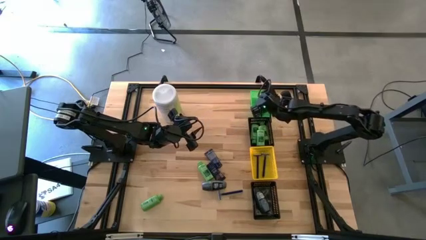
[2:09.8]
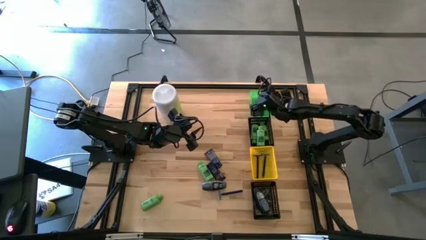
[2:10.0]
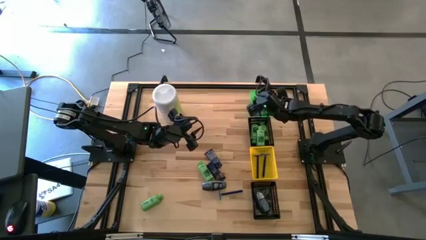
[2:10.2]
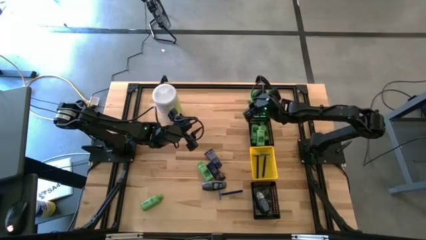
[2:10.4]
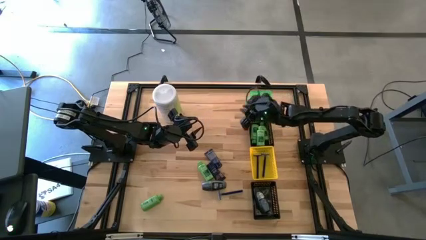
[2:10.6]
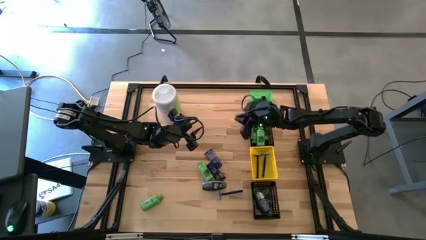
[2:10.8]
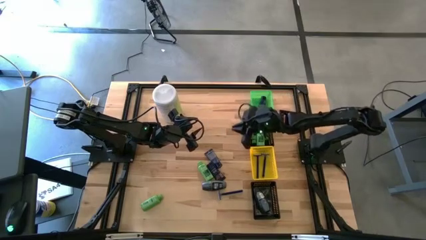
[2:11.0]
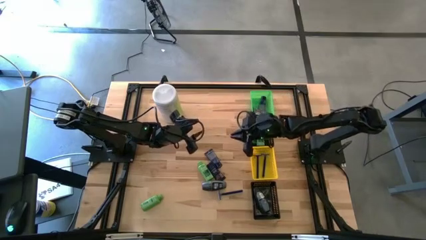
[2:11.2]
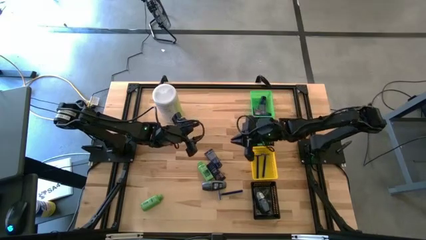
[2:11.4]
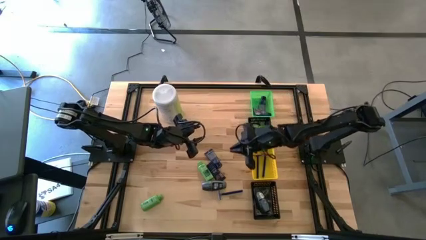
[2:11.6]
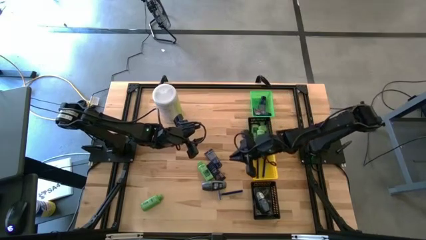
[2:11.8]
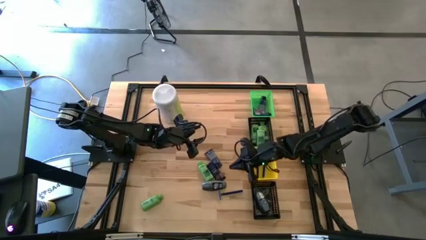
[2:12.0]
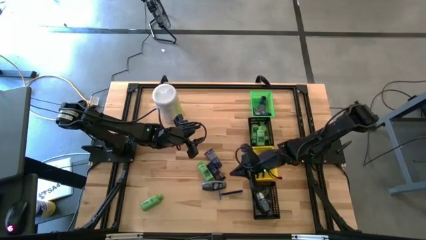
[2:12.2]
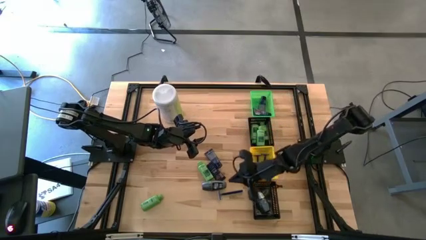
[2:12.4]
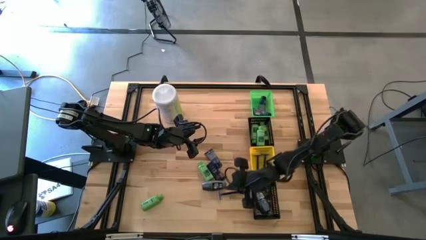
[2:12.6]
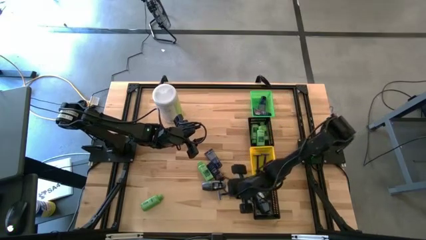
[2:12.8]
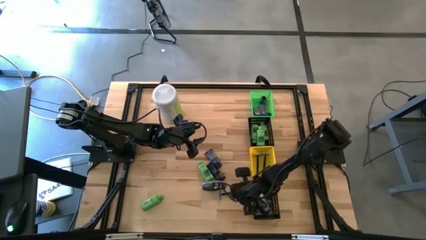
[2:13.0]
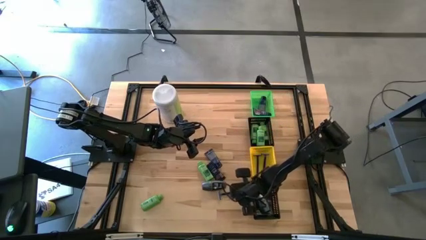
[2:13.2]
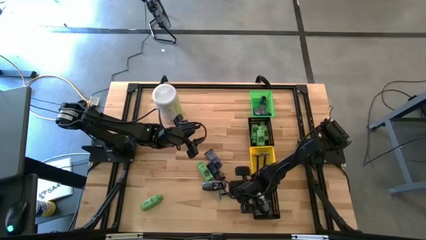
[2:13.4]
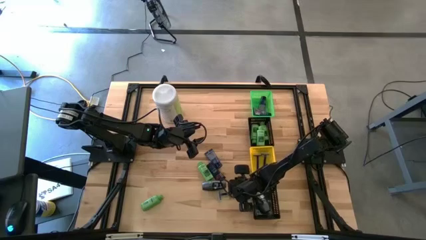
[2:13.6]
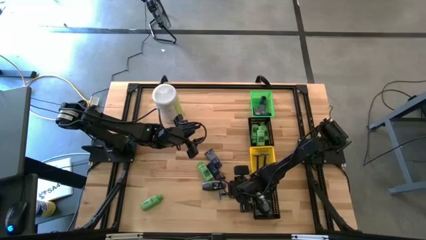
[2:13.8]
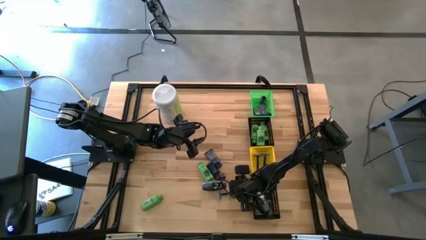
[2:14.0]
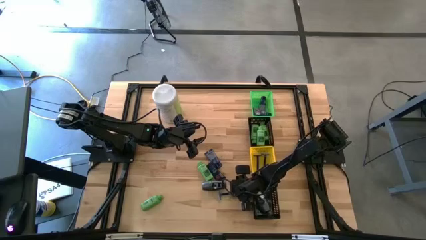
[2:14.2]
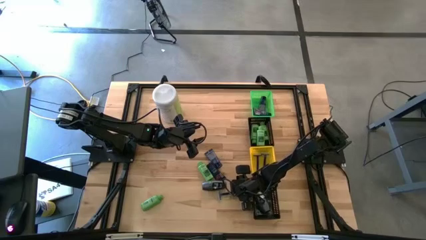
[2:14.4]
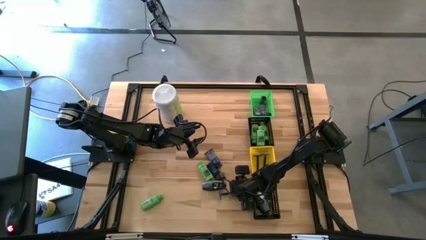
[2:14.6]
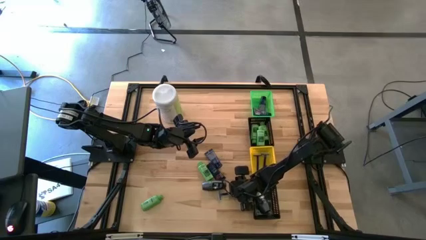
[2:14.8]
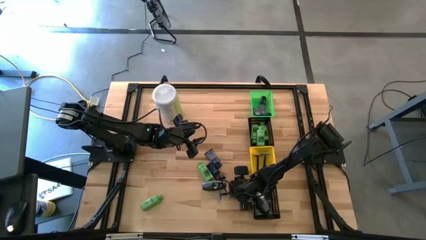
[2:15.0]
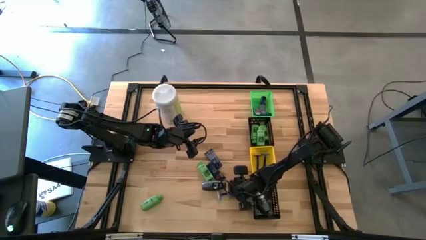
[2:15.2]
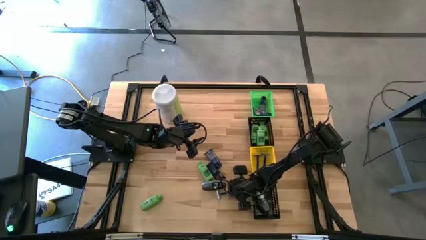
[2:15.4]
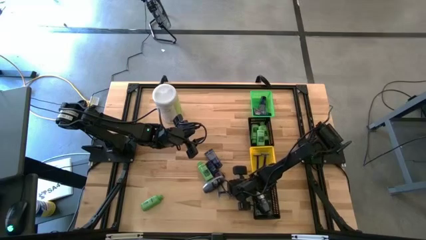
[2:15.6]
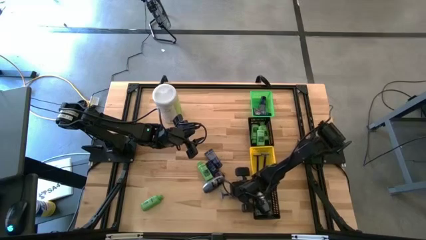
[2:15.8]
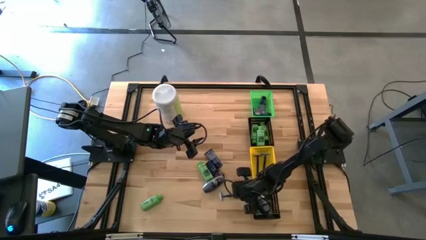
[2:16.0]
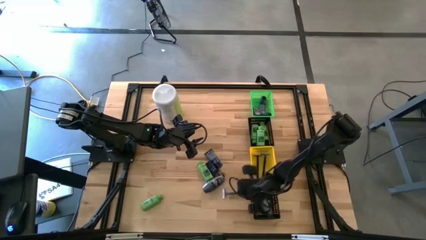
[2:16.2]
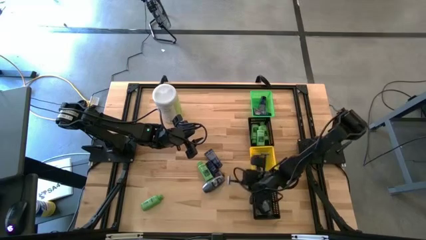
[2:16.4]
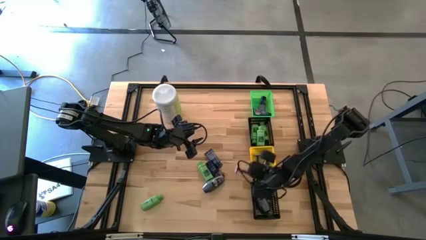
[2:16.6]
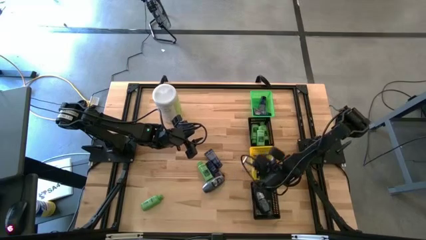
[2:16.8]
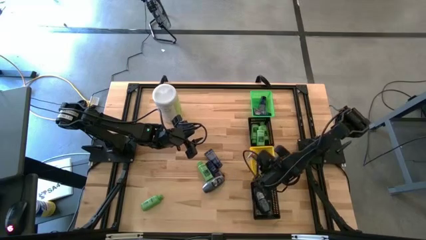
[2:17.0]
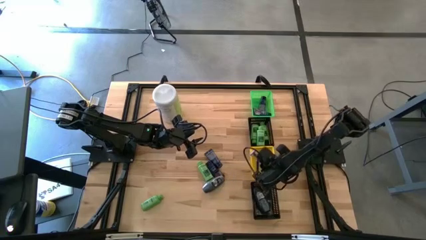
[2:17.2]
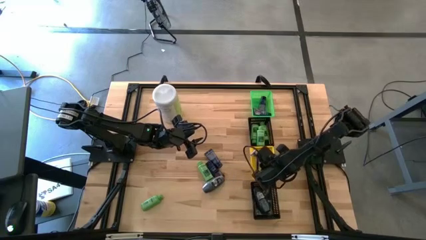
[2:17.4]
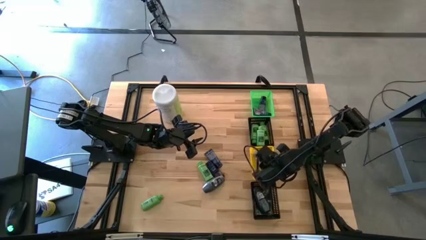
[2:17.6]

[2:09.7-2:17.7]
Task: Pick & Place Travel size toiletries
Put the blue razor into the yellow basket

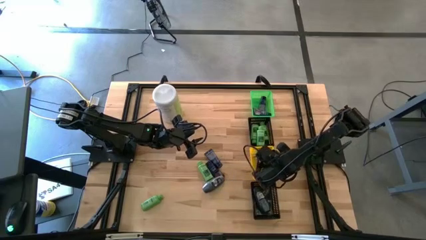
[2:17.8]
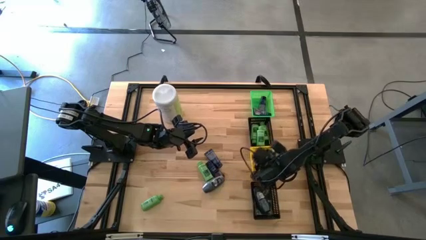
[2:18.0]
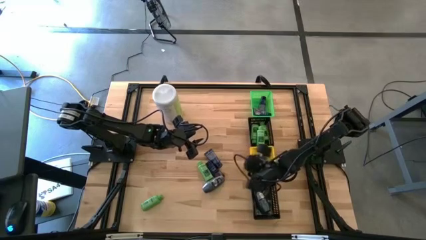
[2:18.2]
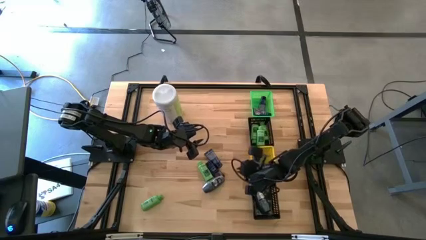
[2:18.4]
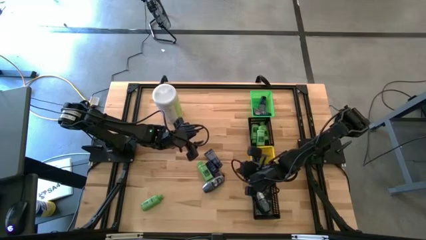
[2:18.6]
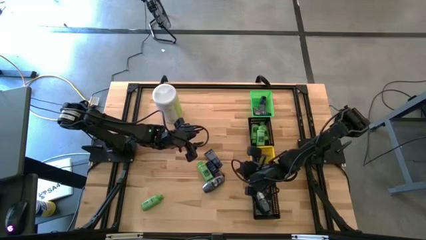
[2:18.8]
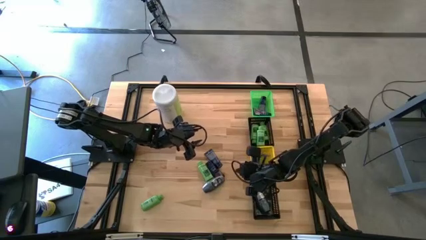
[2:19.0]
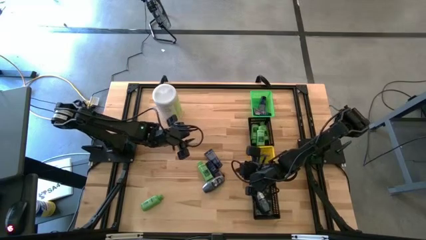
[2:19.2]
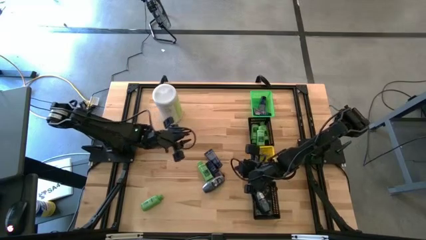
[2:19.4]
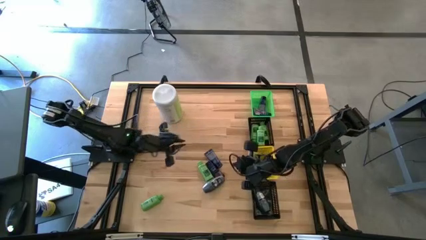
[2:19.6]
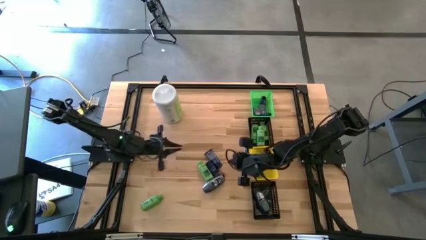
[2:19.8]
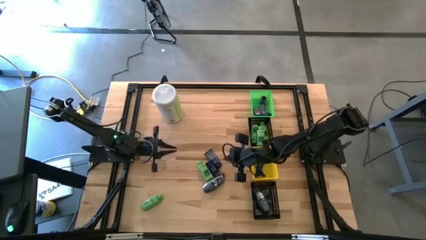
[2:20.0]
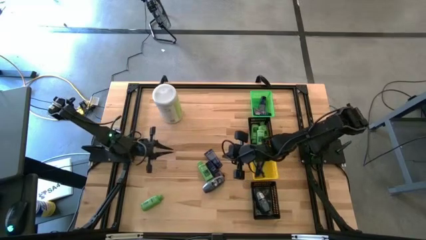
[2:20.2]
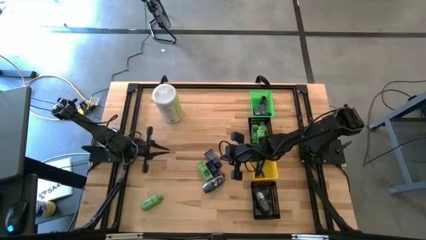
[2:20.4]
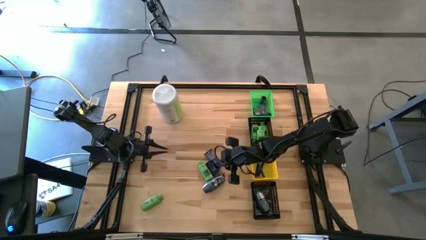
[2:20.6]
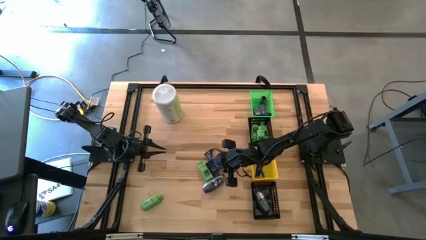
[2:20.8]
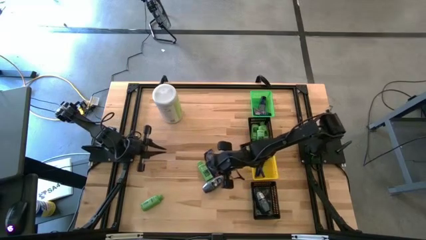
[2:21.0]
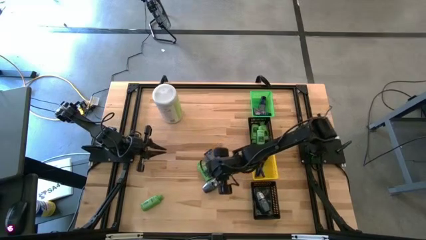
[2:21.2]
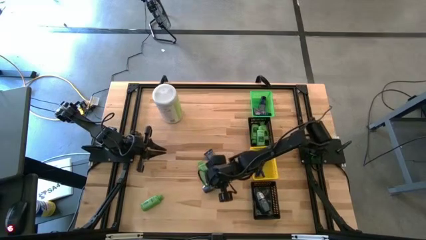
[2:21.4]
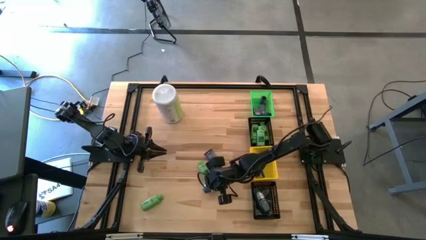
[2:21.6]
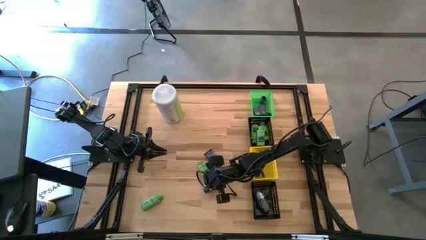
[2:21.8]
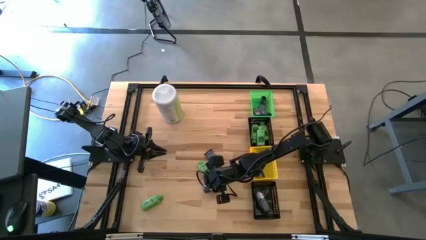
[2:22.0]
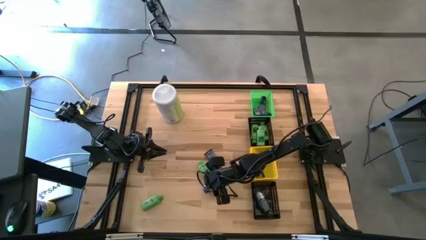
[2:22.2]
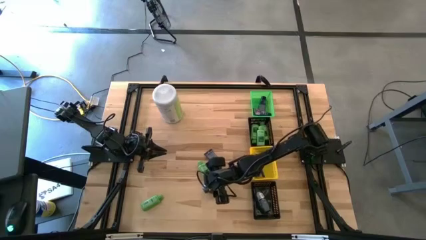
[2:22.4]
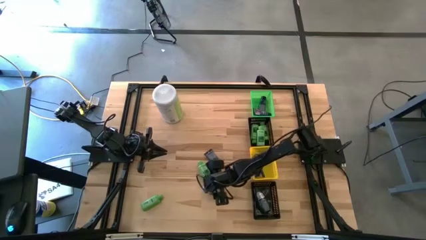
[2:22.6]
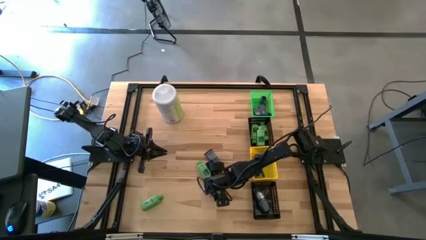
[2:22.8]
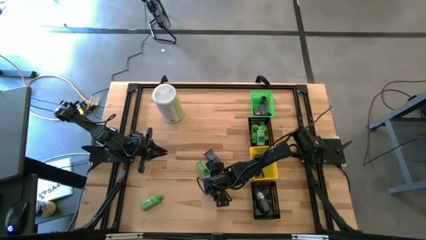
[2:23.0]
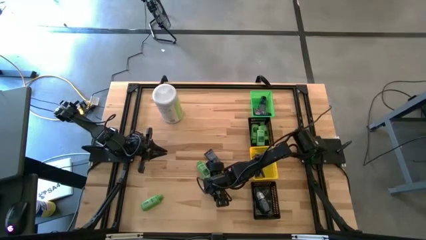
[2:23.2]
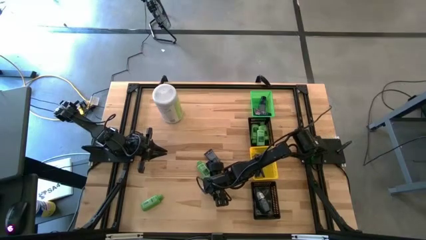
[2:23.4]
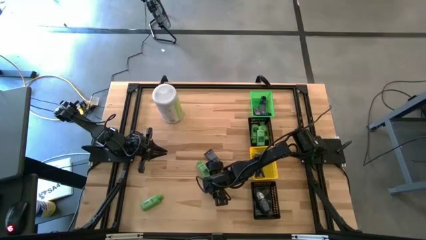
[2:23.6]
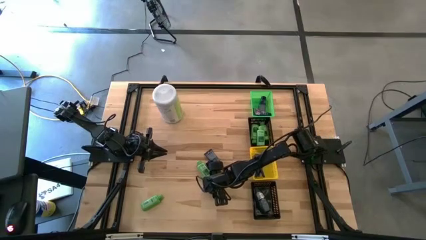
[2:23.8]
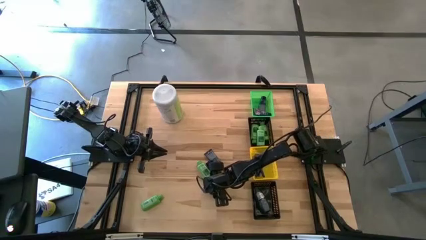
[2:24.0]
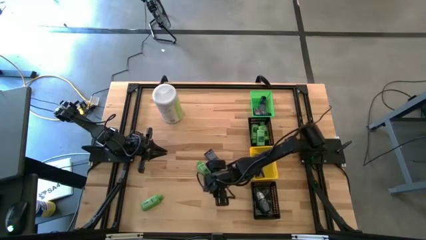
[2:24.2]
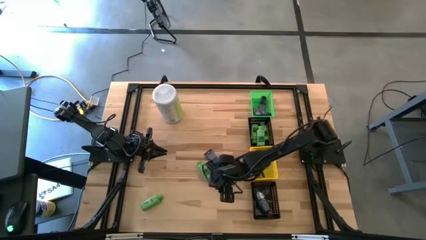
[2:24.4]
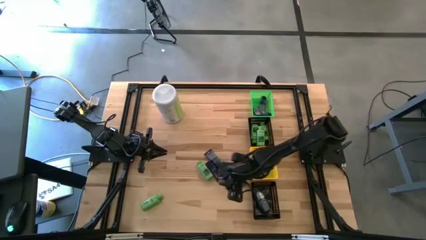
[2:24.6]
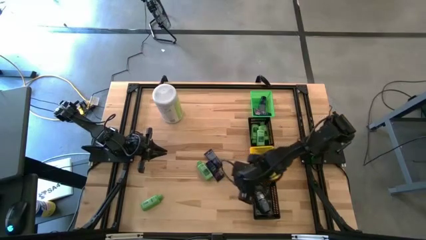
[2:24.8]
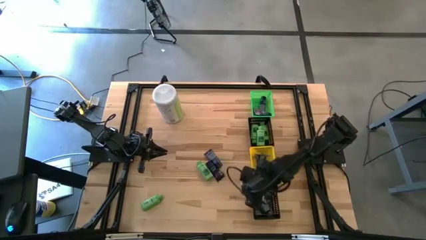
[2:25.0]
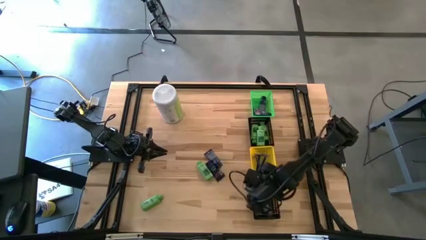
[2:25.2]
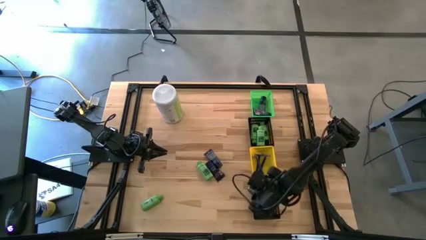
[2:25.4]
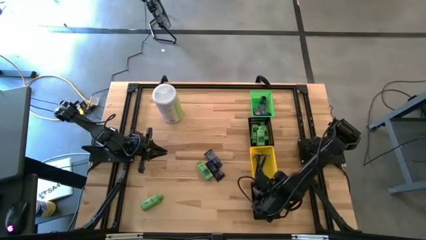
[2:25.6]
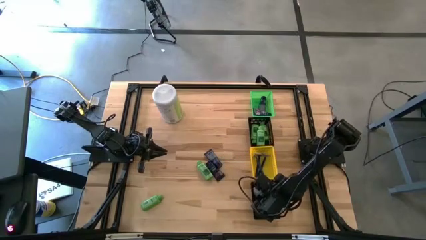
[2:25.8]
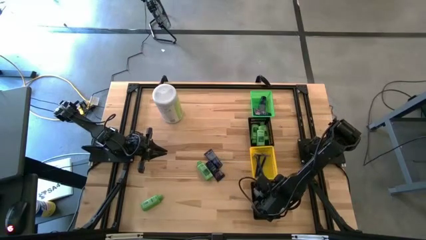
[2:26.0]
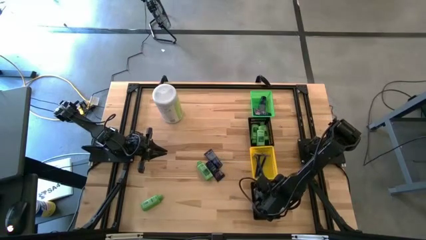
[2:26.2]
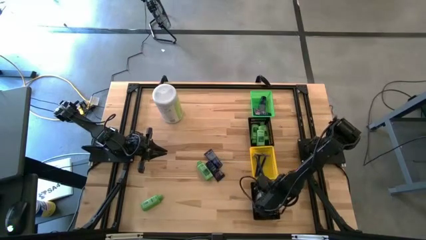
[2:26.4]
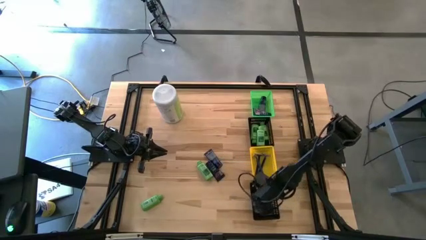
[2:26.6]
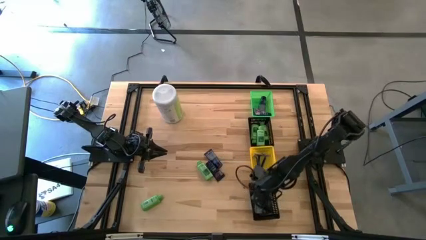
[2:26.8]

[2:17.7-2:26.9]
Put the gray deodorant into the bottom black bin
